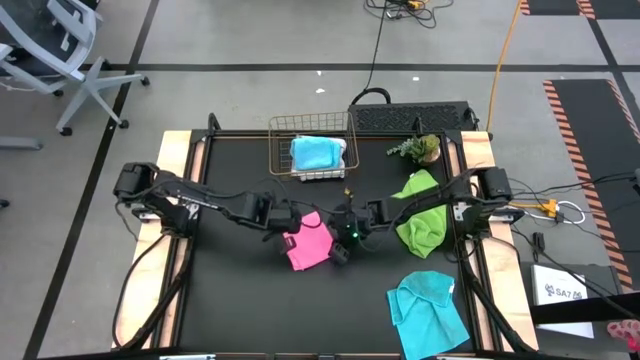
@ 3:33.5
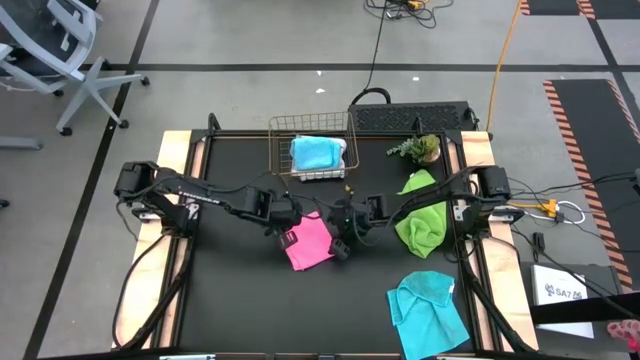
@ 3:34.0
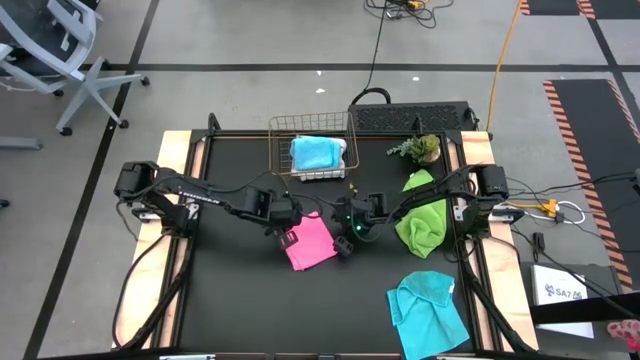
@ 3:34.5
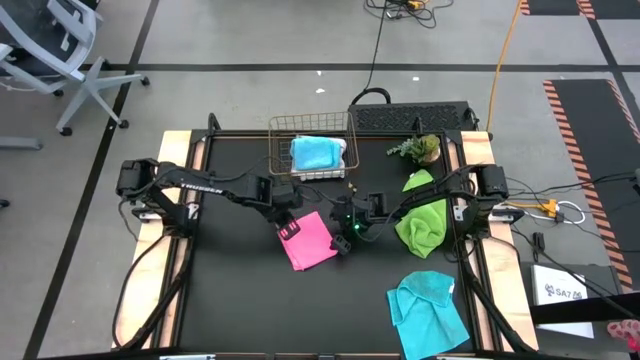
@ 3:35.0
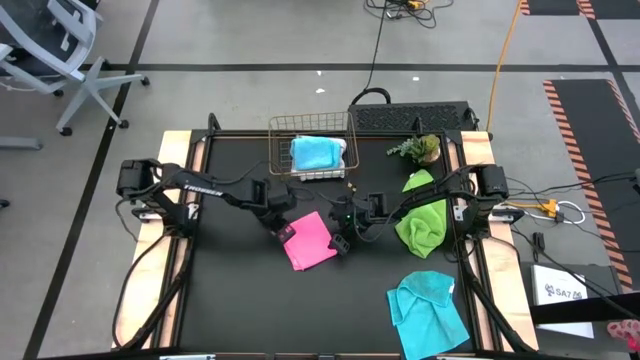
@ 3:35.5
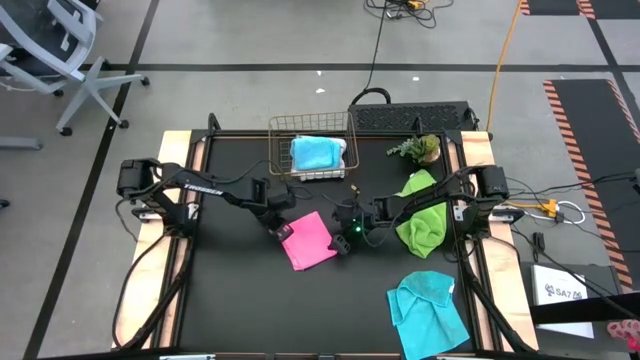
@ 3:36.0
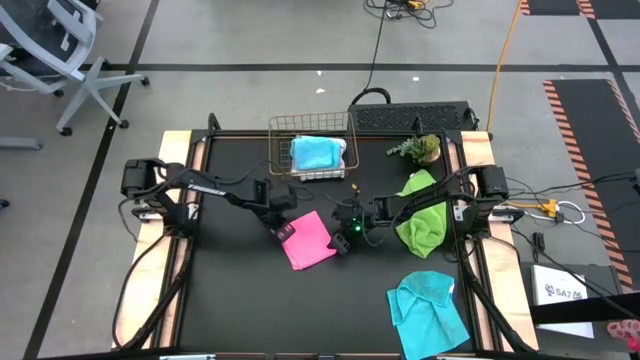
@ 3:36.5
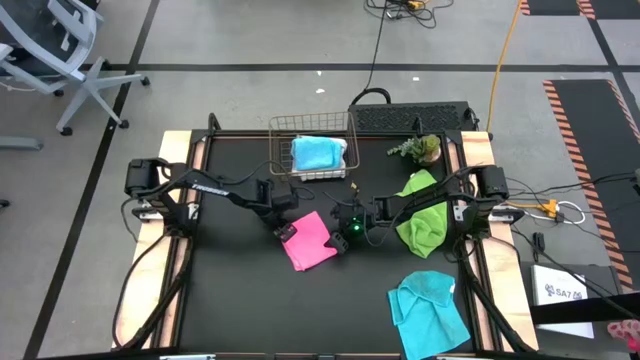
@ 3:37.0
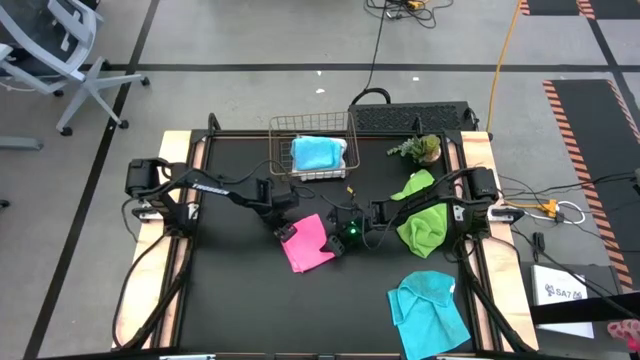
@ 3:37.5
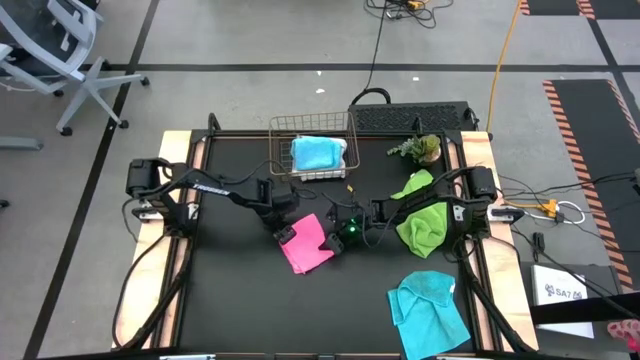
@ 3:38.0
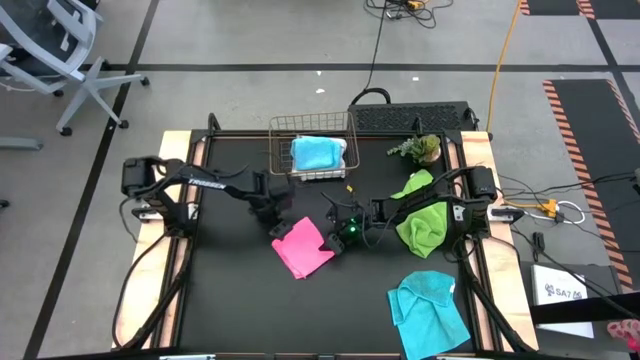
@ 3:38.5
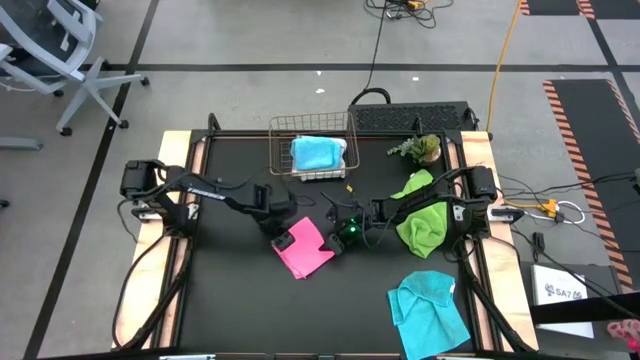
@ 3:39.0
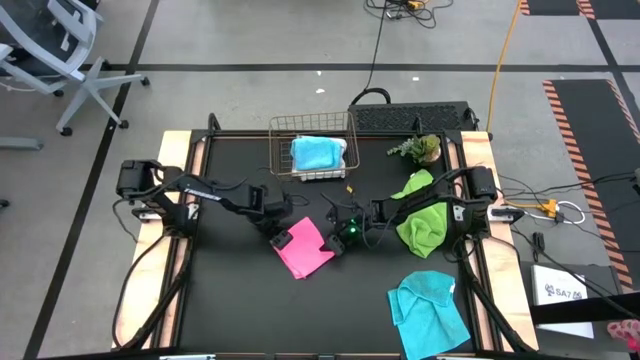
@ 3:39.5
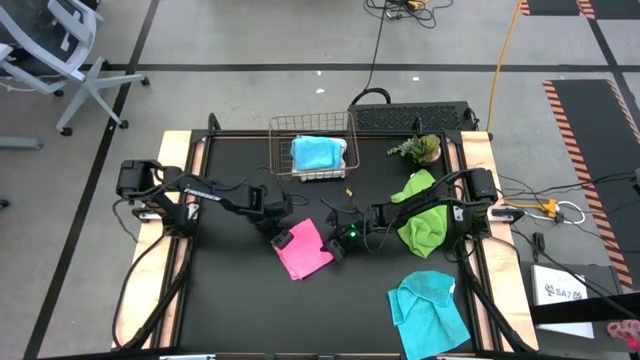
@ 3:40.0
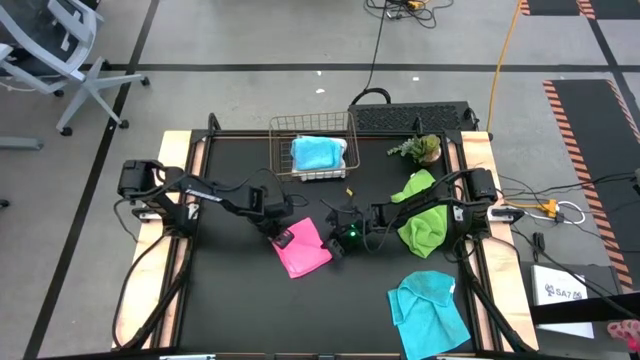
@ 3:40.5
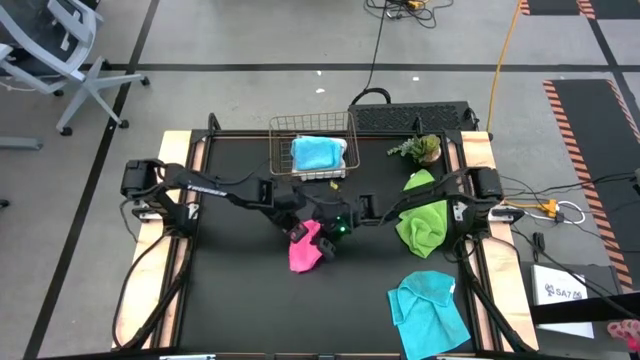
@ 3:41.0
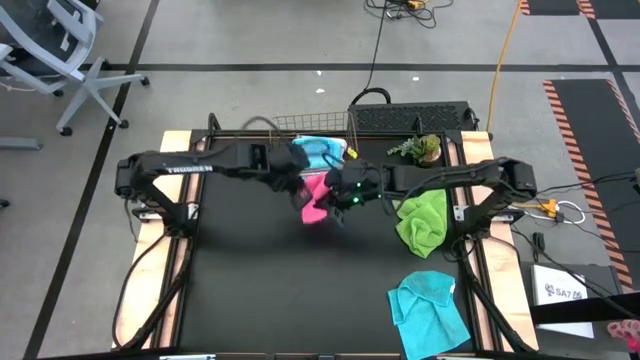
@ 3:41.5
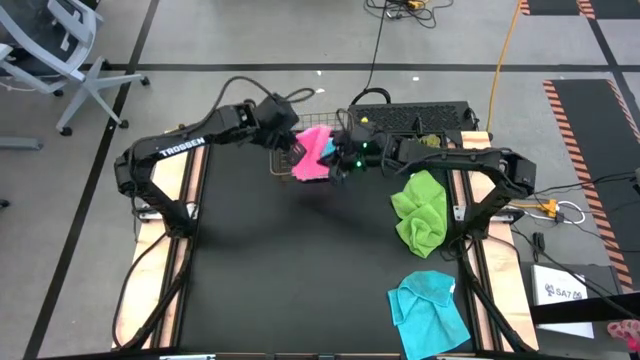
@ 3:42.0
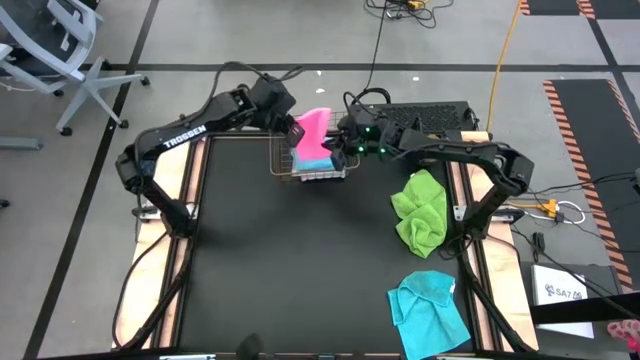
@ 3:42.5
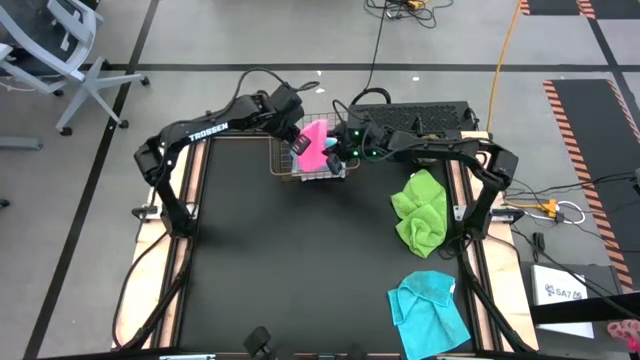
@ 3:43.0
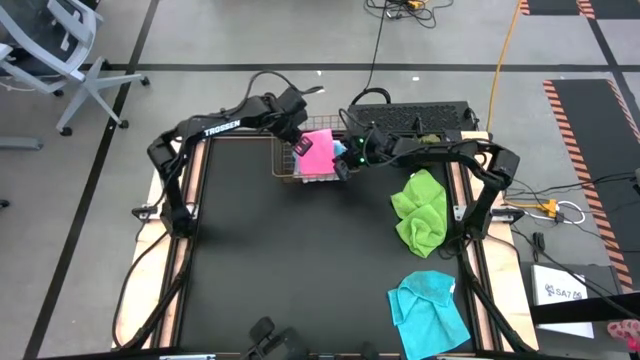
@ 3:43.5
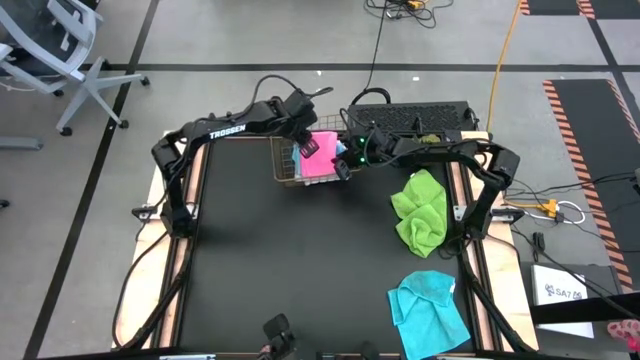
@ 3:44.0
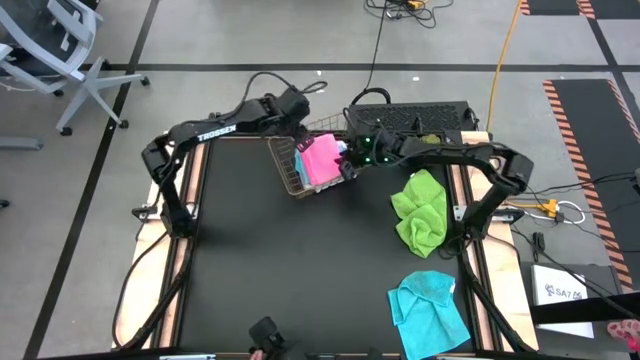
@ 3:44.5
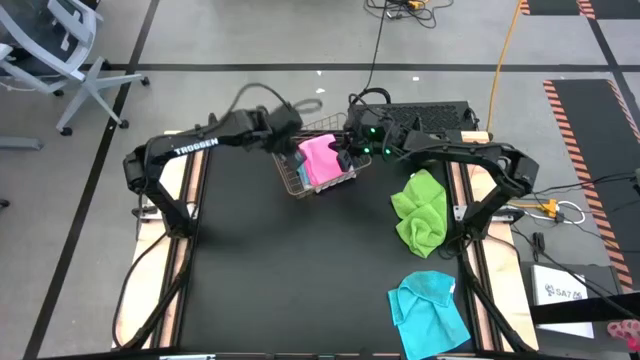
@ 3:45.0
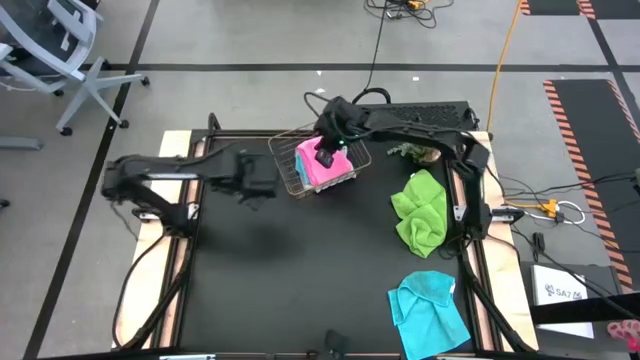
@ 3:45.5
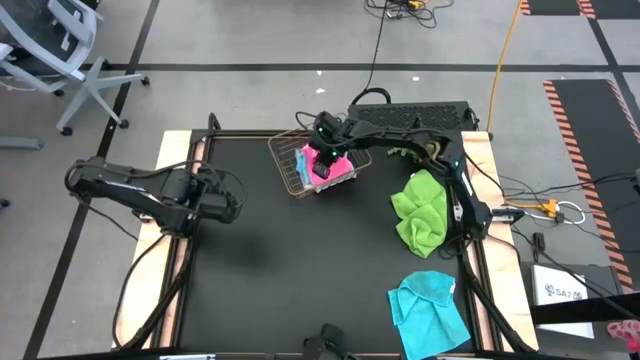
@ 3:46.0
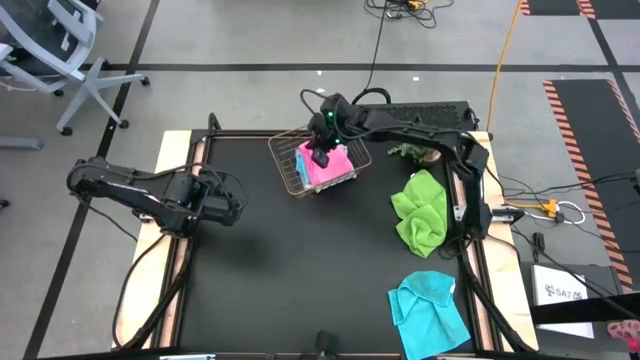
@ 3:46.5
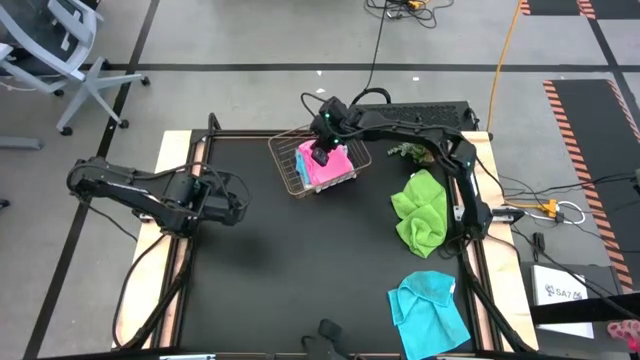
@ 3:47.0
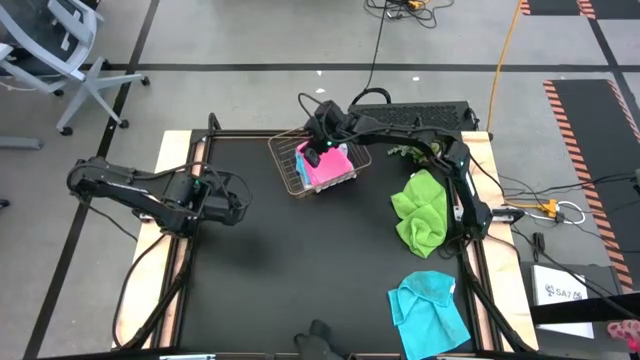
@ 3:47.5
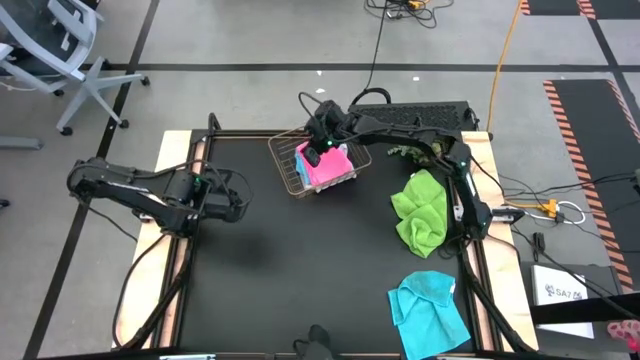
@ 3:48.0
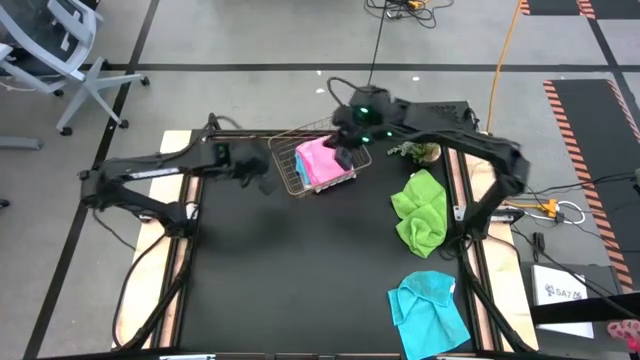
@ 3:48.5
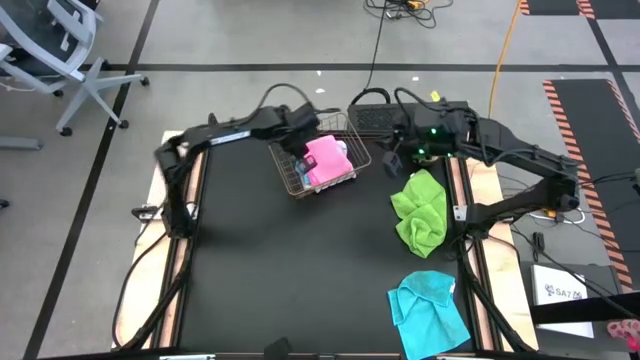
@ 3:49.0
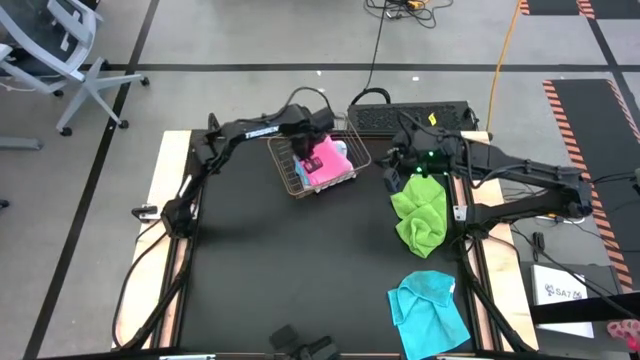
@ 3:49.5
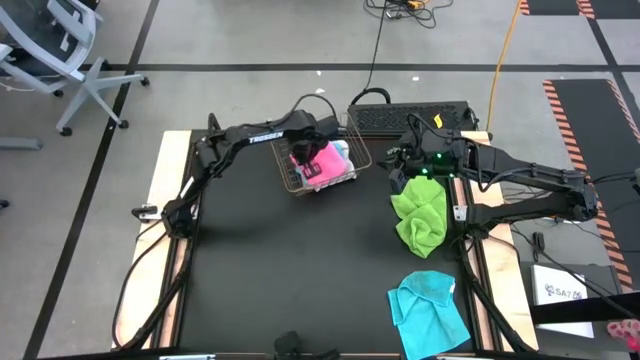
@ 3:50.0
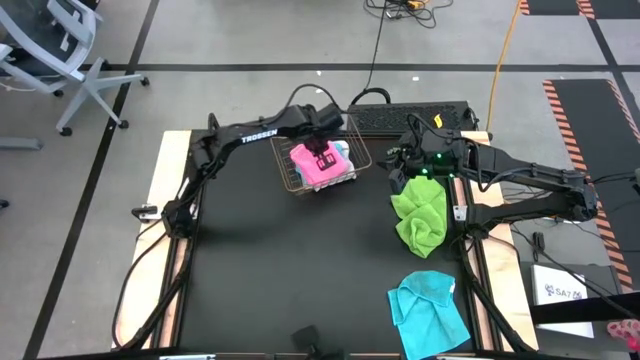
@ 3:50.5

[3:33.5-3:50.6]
Task: Fold microfiber towels
Put the pink microfiber cloth into the wire basket

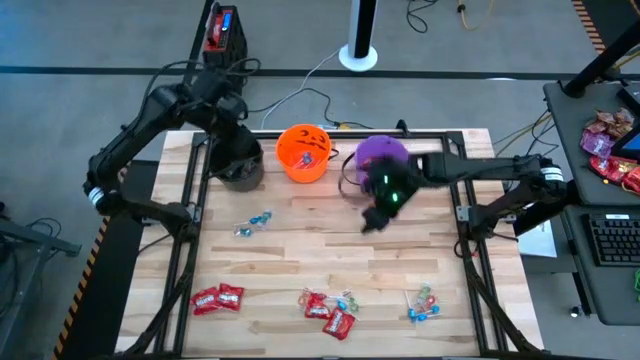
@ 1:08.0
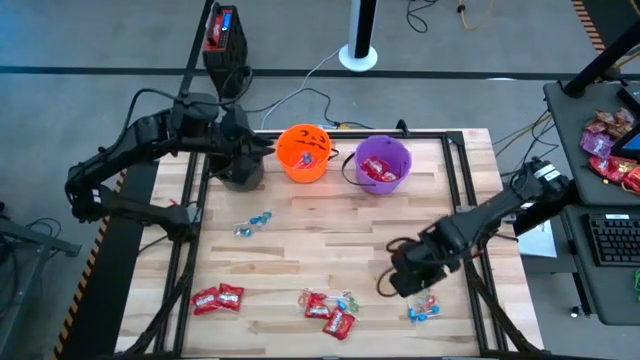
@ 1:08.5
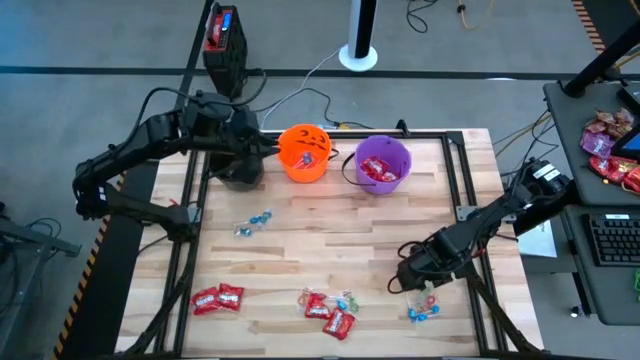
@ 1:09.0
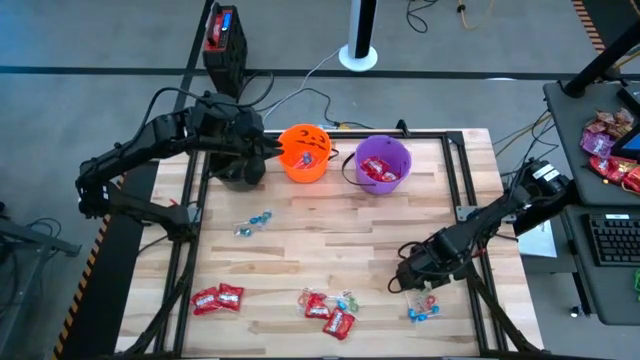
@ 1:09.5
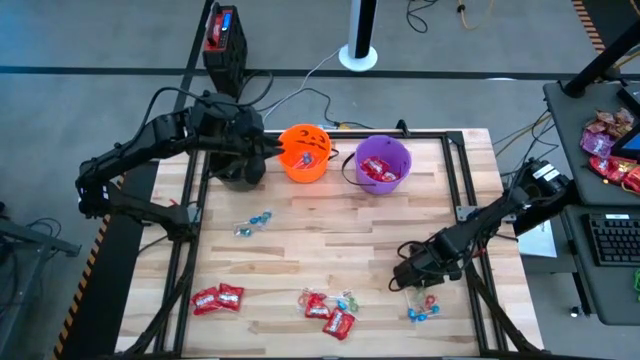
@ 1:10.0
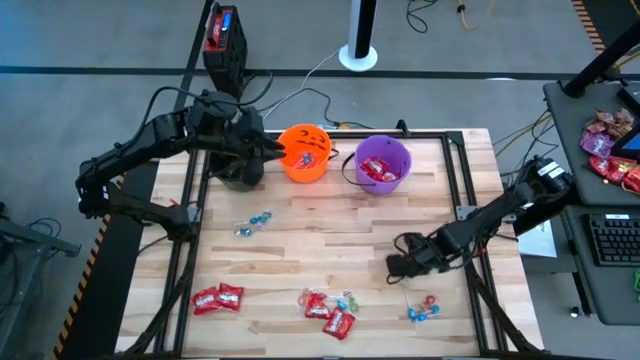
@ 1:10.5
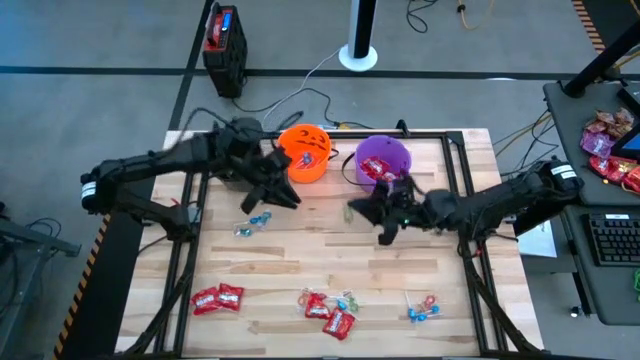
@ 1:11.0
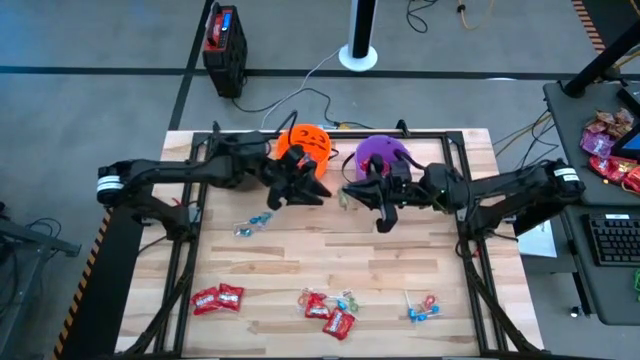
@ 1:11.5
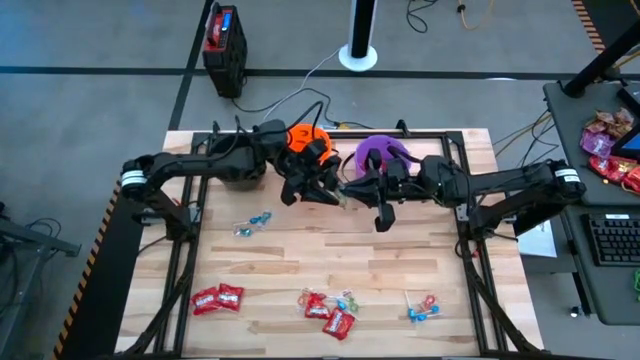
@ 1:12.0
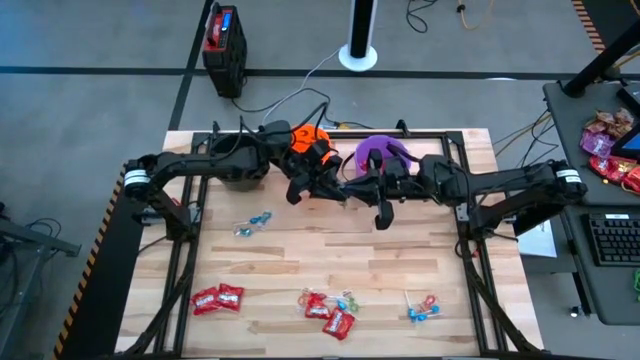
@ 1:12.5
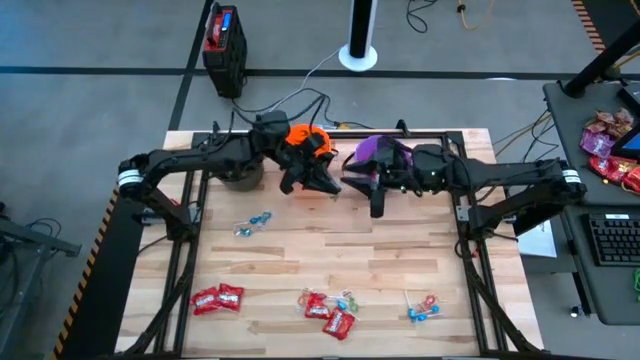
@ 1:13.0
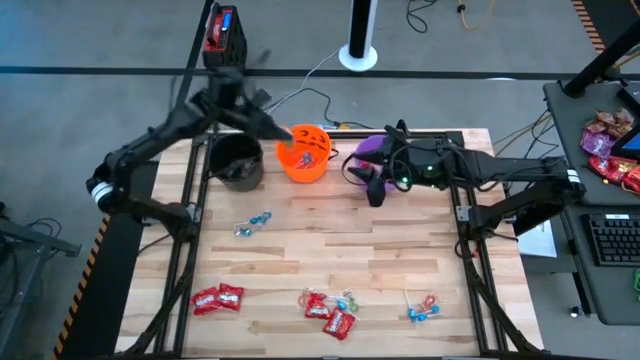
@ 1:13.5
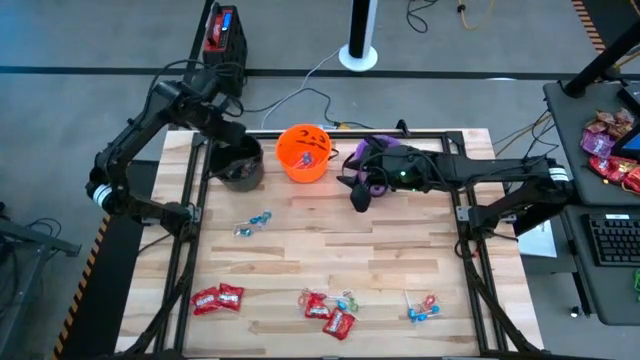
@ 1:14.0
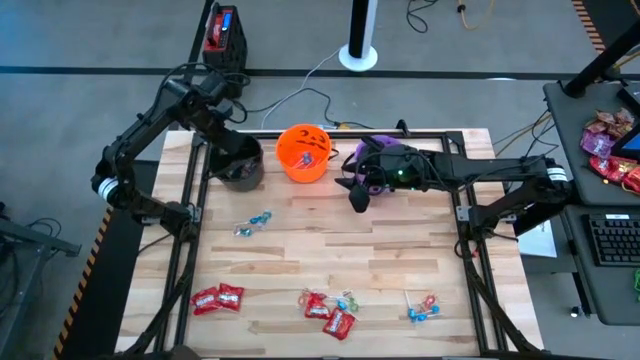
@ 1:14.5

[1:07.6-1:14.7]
Task: Sort candy by brand, put in halloween buckets
Put the green gummy into the black bucket
